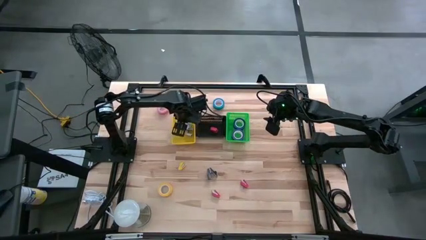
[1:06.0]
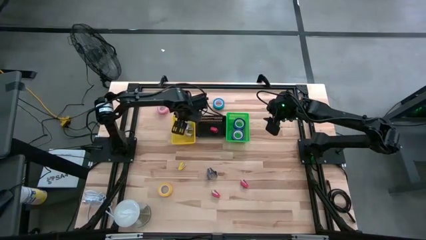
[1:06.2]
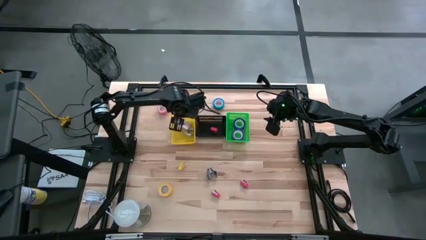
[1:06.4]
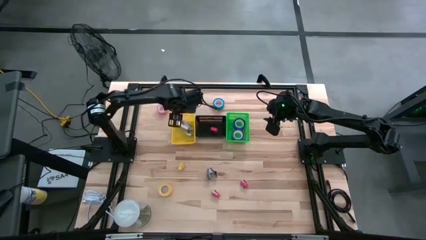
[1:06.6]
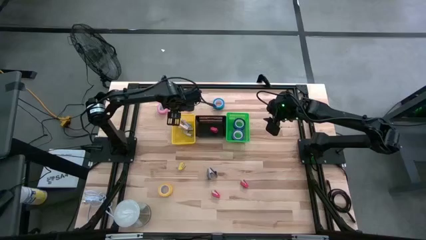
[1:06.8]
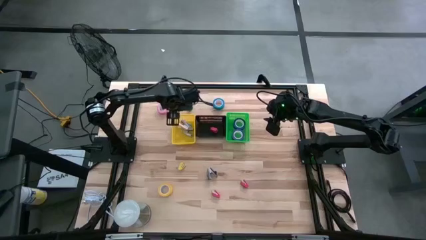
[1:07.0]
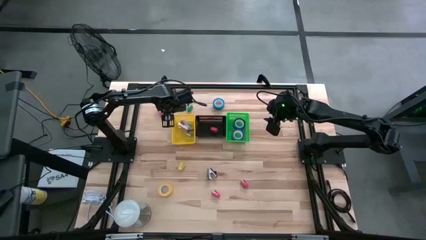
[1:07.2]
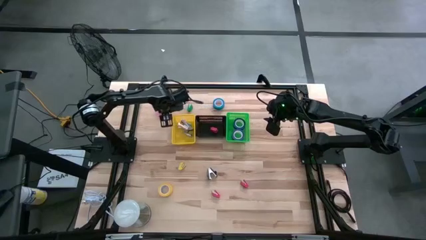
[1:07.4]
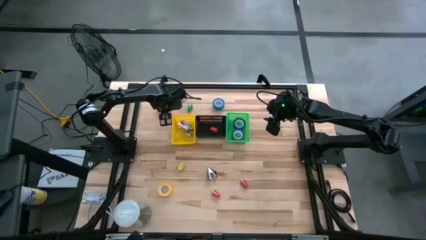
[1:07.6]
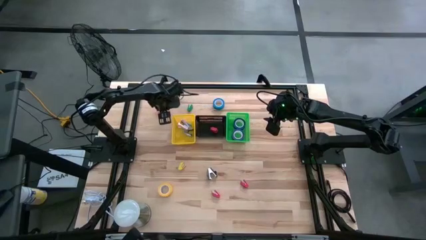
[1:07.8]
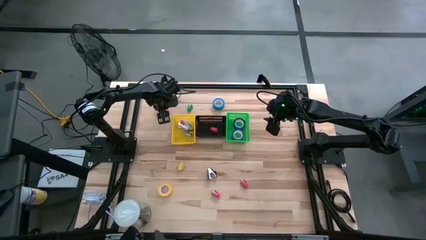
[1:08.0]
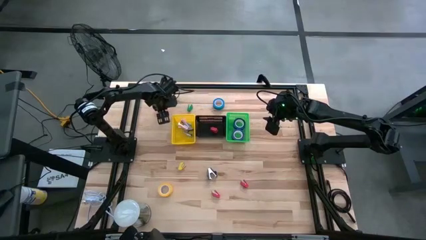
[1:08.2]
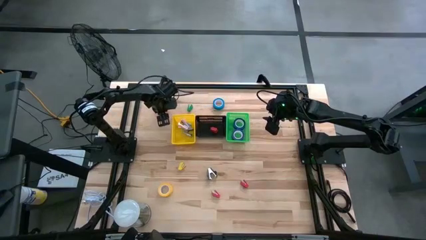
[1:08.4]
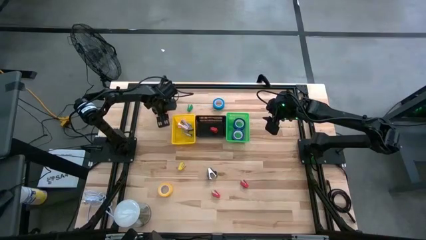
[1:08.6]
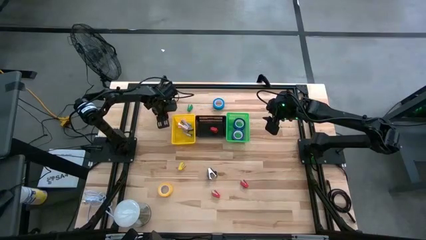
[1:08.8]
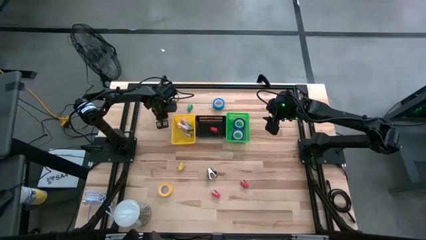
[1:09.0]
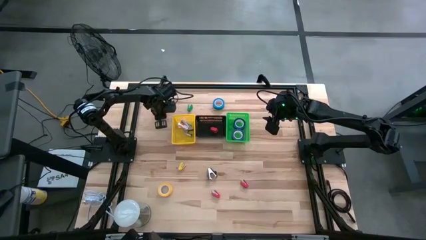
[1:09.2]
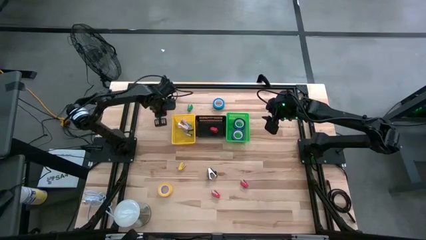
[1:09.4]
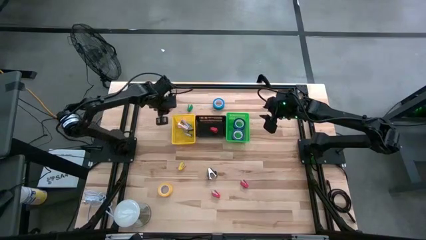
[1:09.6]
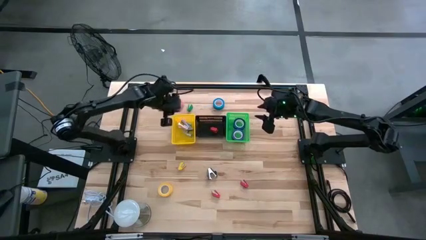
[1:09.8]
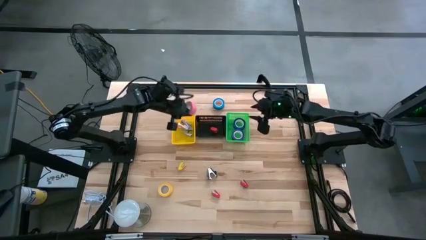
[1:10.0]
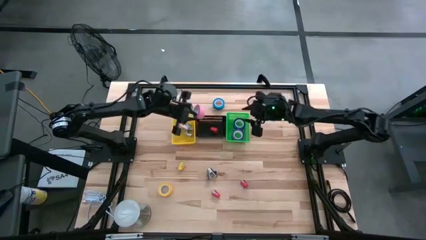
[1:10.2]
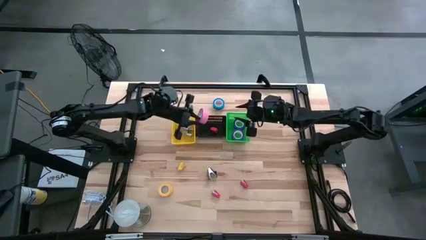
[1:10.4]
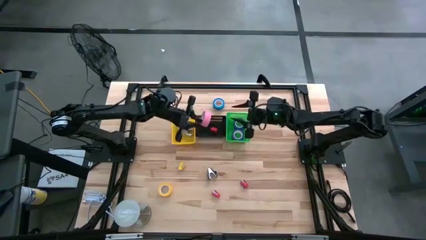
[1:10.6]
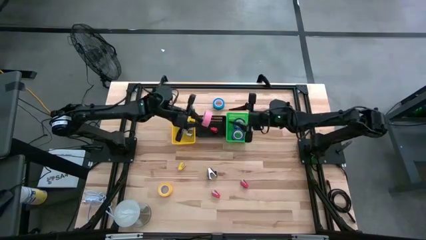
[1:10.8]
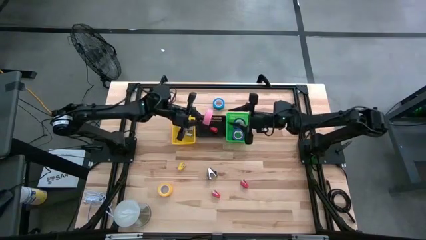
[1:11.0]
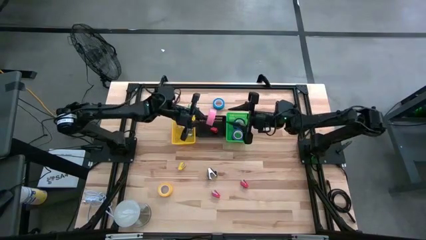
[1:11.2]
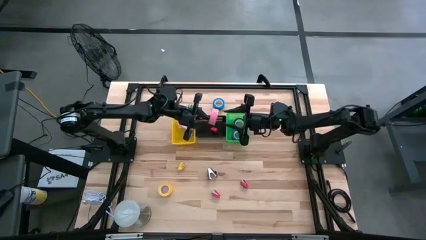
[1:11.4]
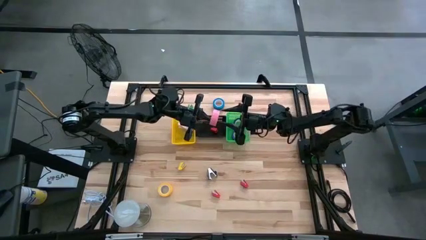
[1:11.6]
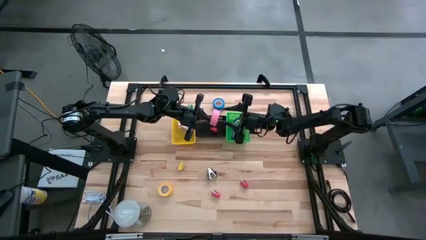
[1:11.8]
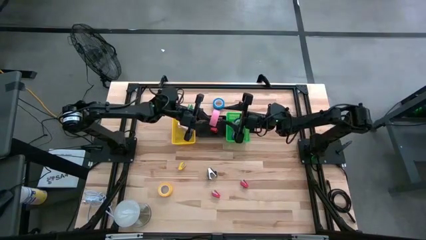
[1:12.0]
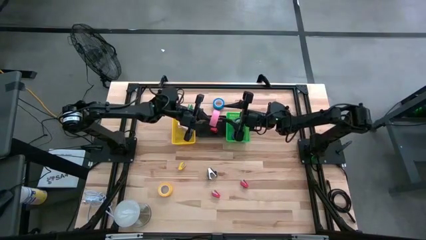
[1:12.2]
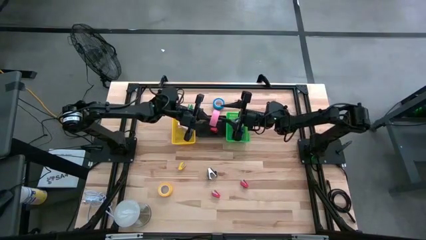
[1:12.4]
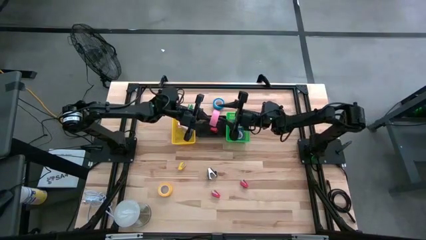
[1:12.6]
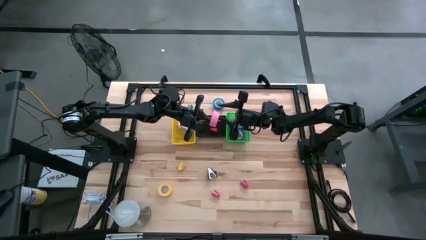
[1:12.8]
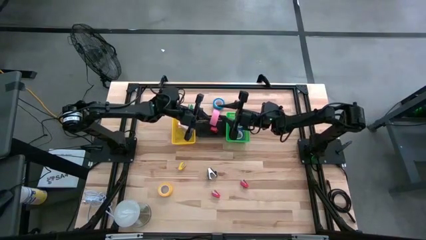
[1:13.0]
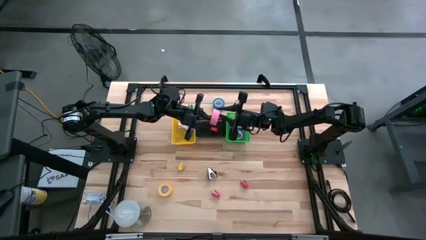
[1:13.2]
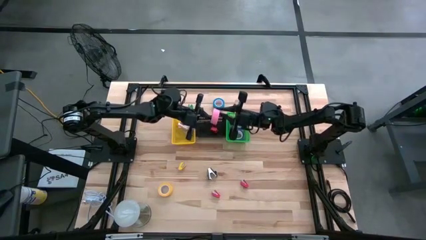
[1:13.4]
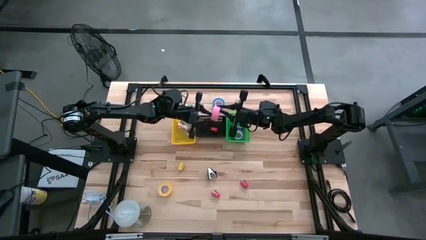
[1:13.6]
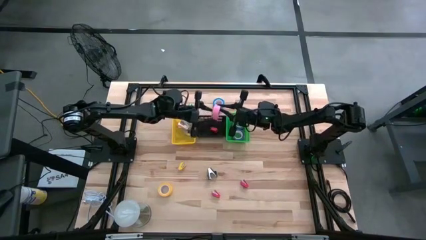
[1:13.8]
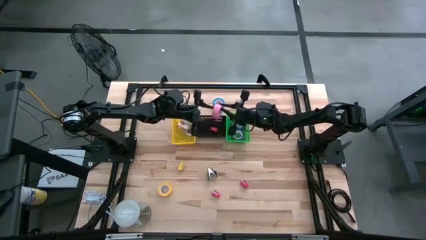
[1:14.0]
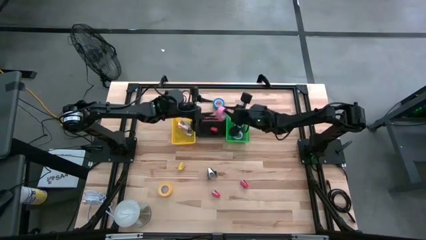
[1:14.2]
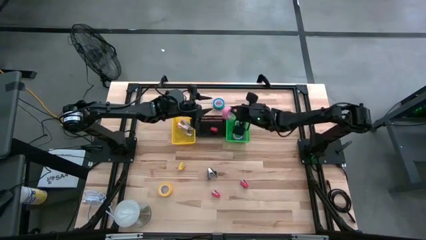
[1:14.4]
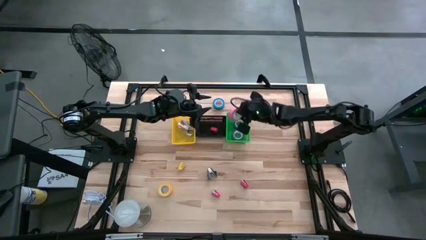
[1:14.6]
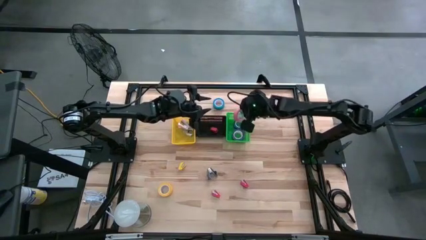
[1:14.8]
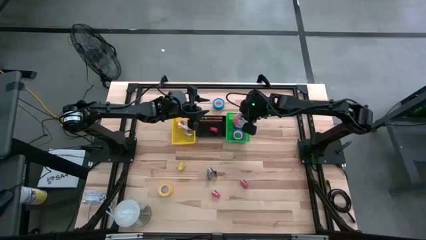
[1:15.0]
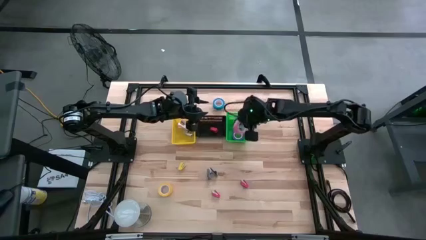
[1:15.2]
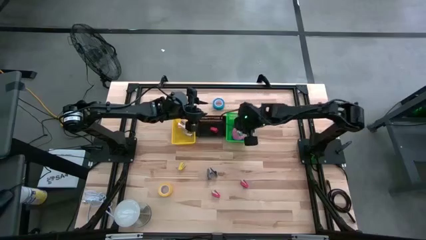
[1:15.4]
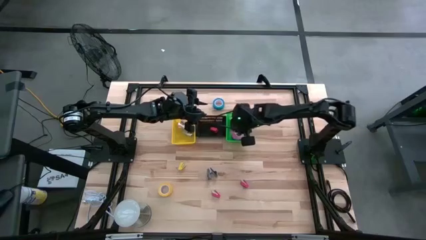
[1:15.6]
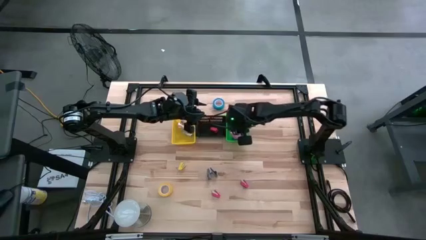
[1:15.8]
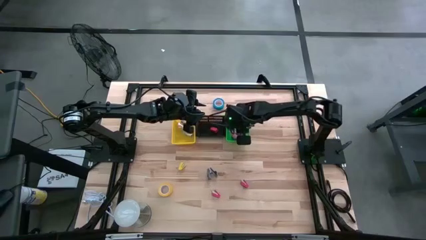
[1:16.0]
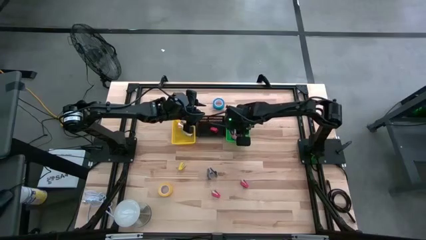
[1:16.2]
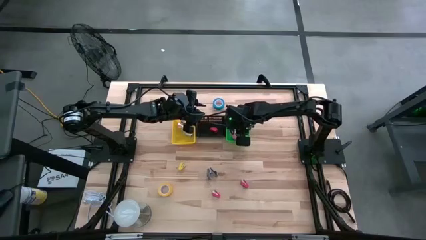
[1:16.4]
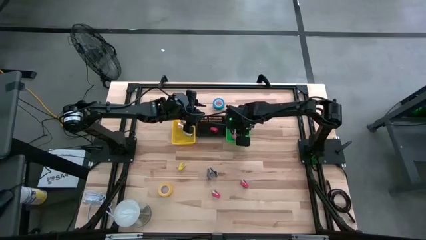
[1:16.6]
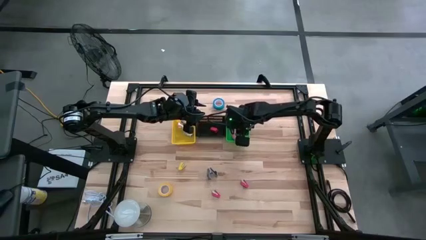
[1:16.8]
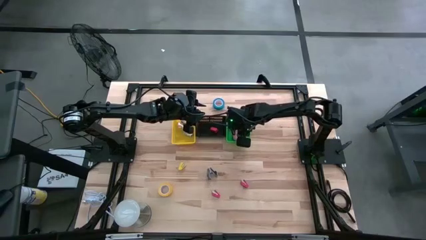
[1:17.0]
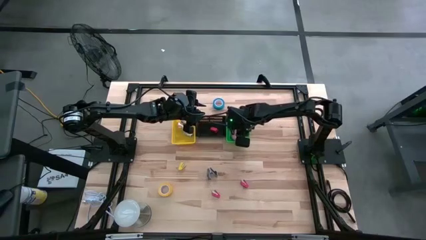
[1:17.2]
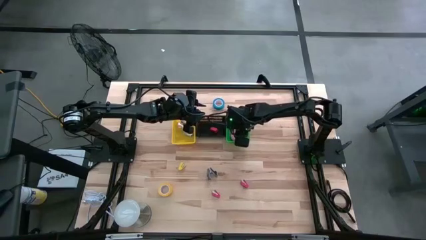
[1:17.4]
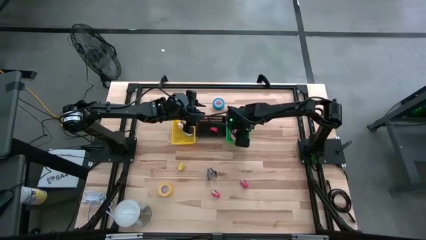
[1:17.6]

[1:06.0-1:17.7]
Task: Pick and place Stapler, Stapler remover, tape
Put the pink tape into the green bin

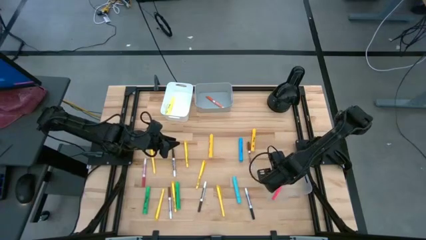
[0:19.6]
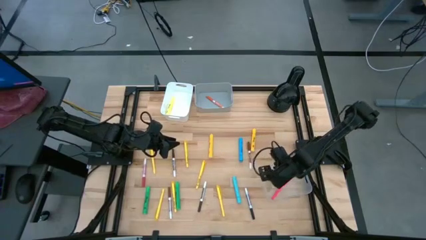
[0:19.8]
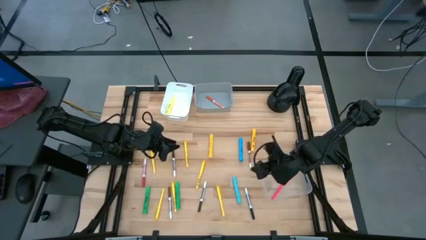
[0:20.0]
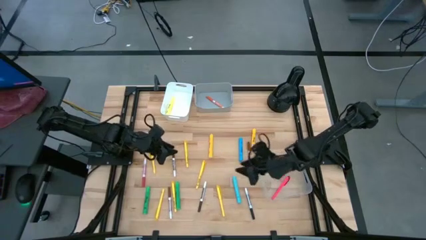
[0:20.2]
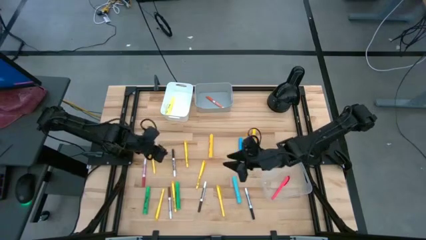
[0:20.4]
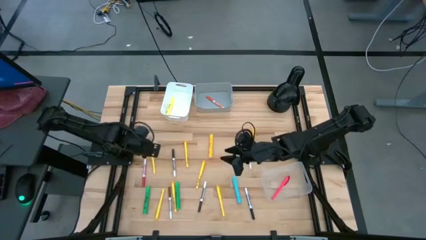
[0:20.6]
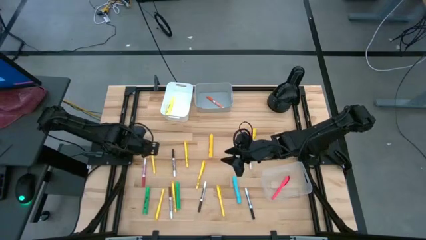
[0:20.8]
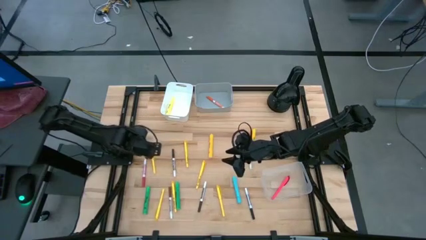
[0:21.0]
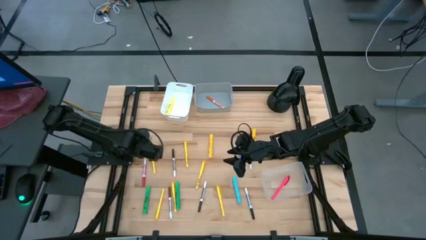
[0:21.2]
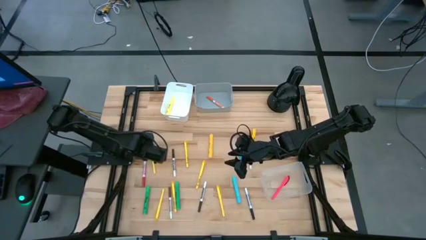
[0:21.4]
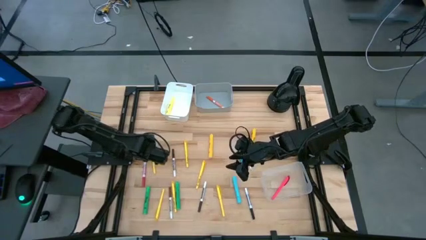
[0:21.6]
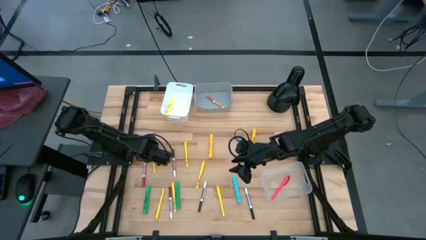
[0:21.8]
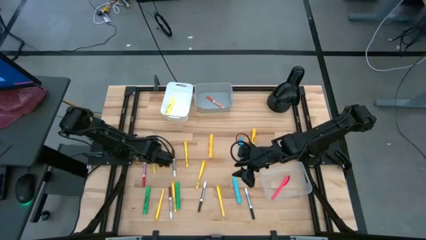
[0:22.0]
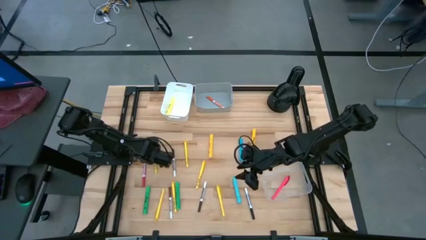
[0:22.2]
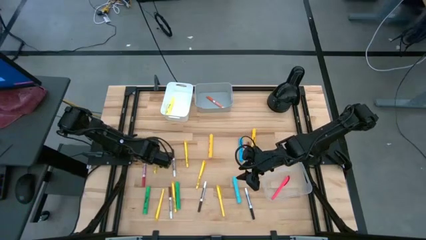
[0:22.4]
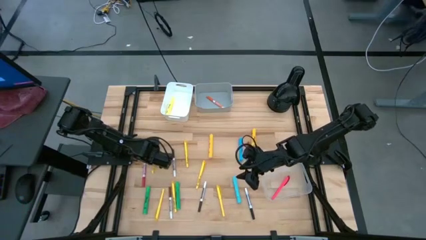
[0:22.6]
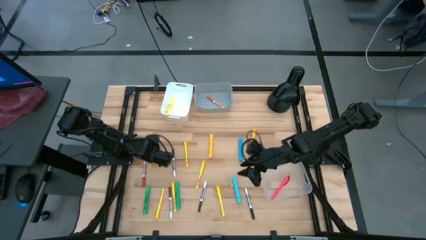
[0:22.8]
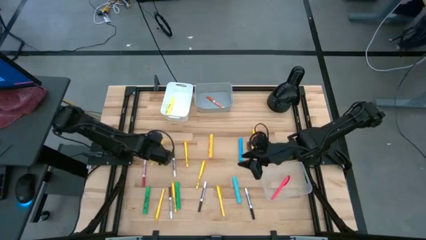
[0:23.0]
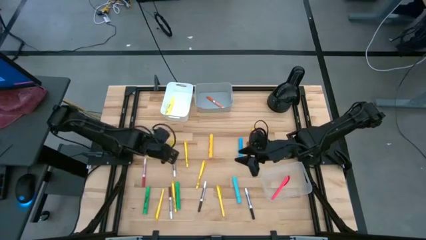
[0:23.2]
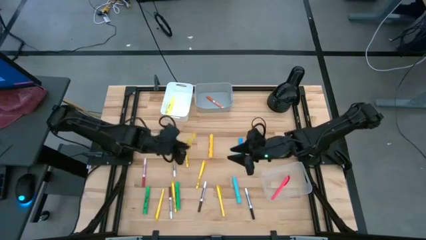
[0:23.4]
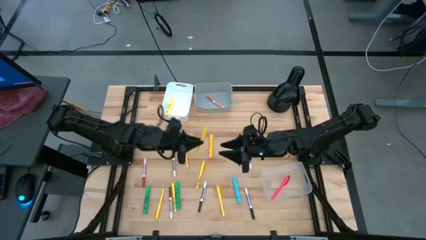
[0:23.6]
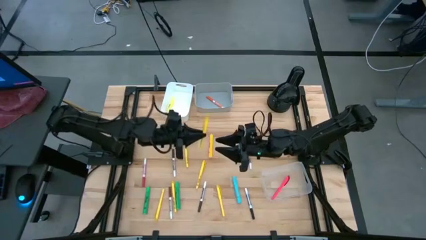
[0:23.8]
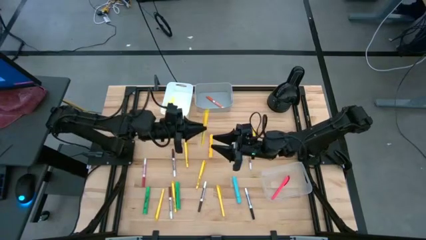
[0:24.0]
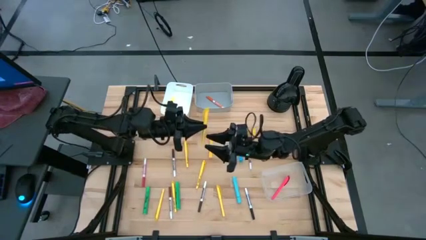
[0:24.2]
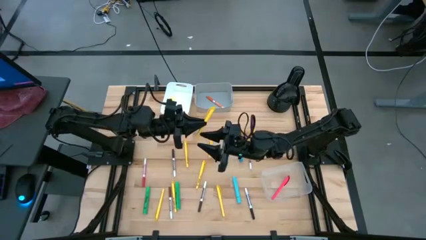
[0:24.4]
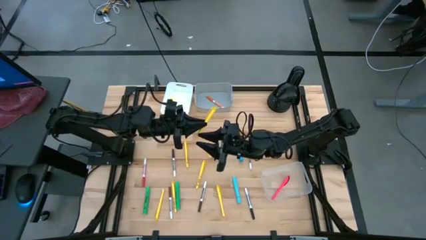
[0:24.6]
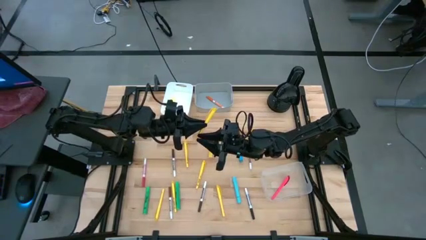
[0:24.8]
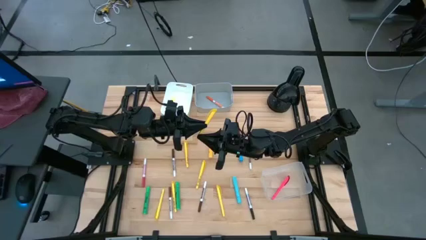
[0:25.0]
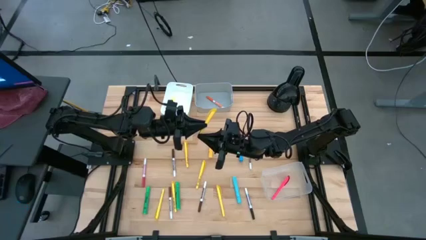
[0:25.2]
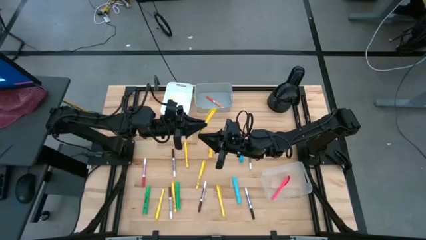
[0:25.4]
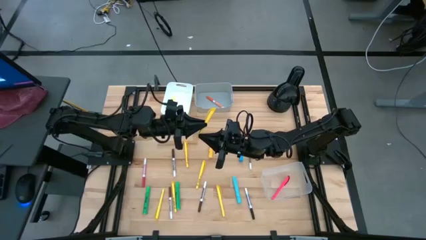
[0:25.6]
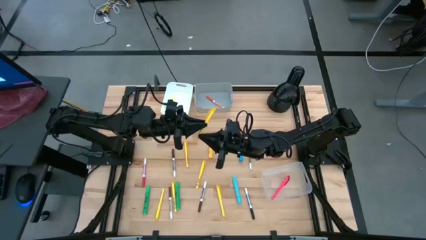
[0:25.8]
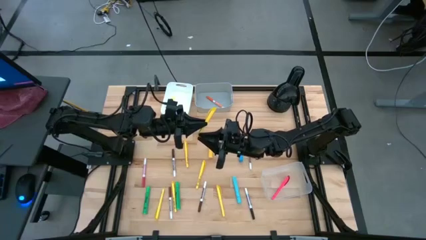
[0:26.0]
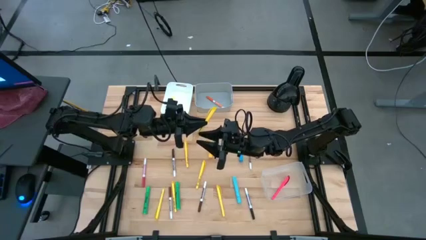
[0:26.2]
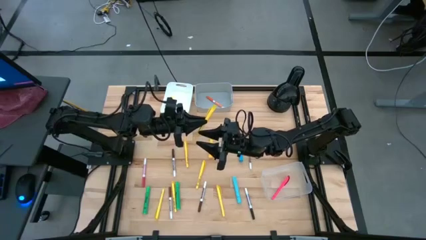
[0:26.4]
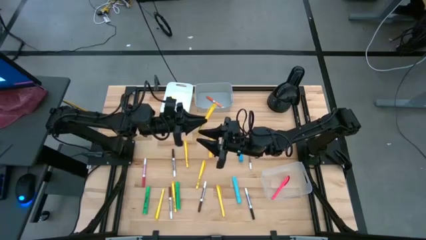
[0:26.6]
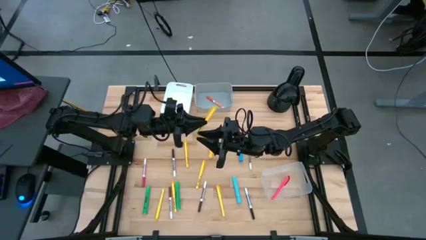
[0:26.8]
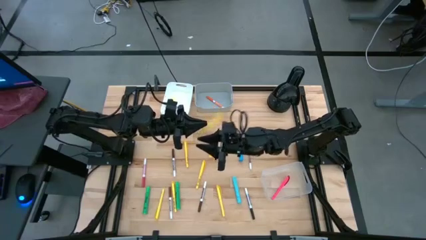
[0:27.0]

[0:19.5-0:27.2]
Task: Pick & Place Markers
Put the yellow pen into the transparent bin
